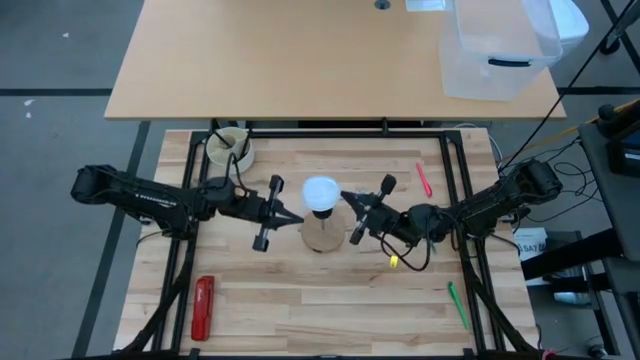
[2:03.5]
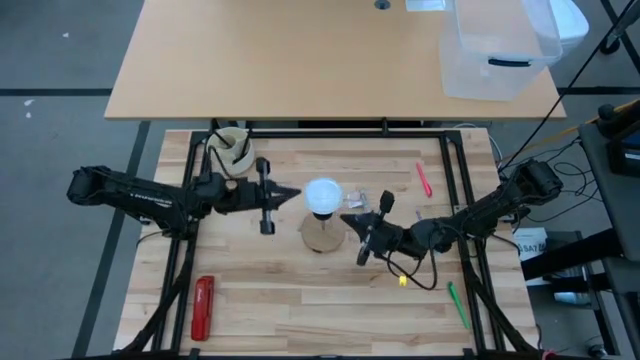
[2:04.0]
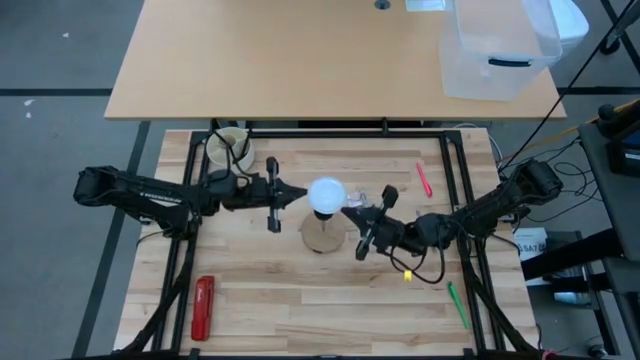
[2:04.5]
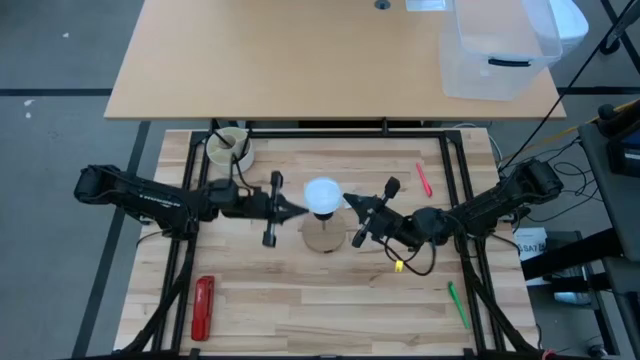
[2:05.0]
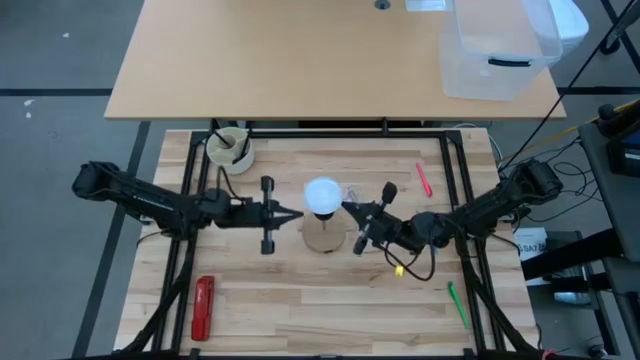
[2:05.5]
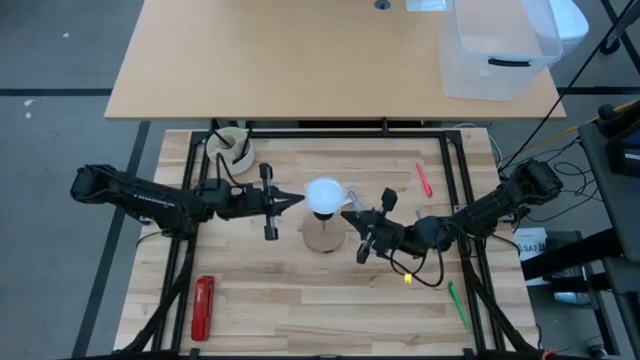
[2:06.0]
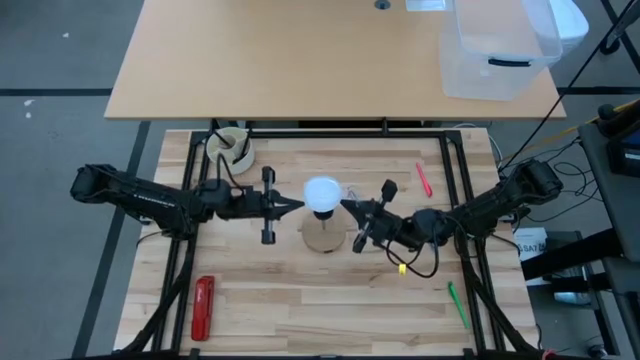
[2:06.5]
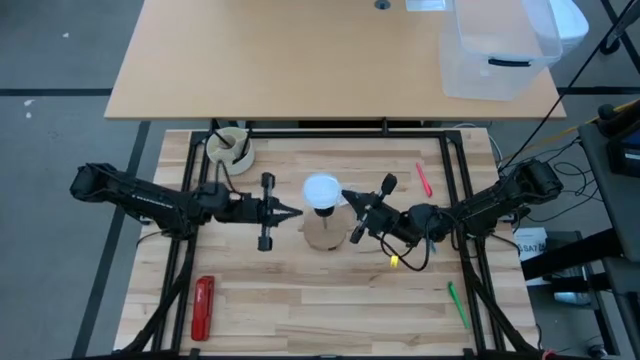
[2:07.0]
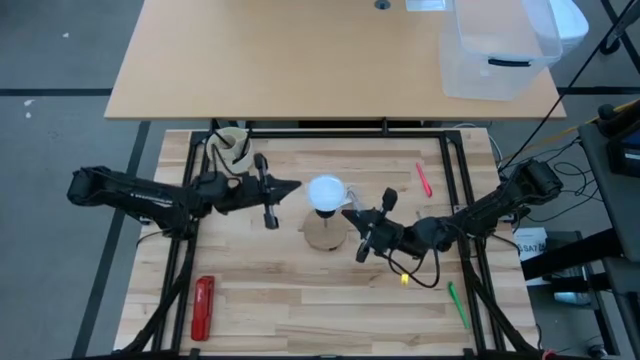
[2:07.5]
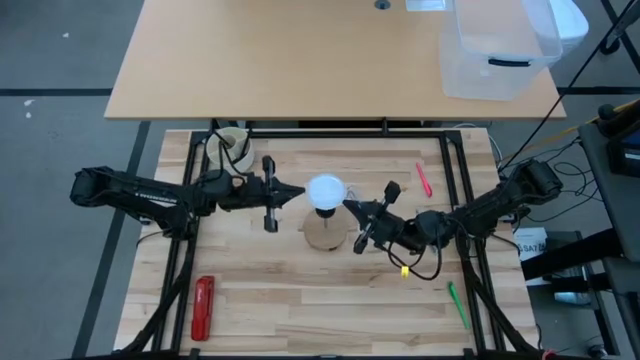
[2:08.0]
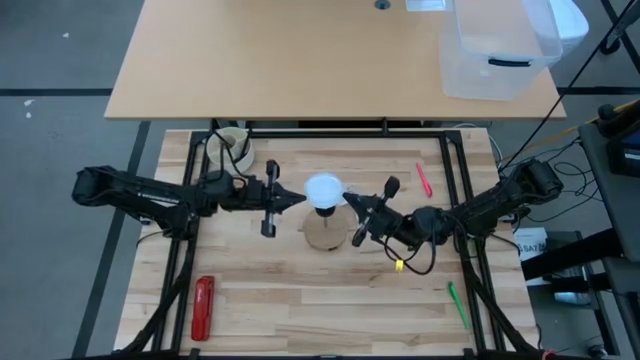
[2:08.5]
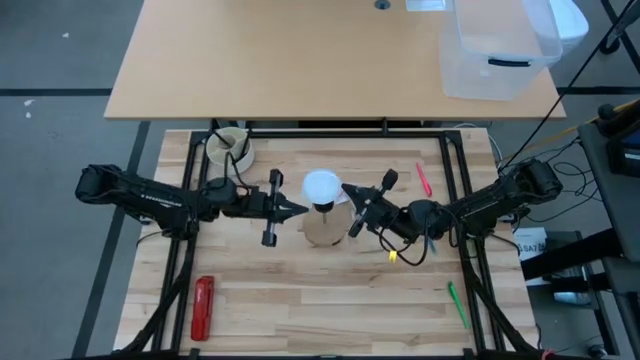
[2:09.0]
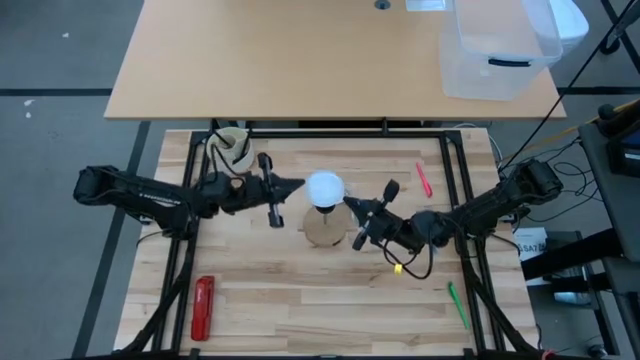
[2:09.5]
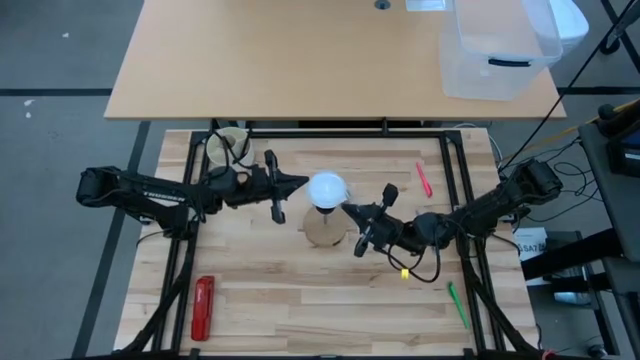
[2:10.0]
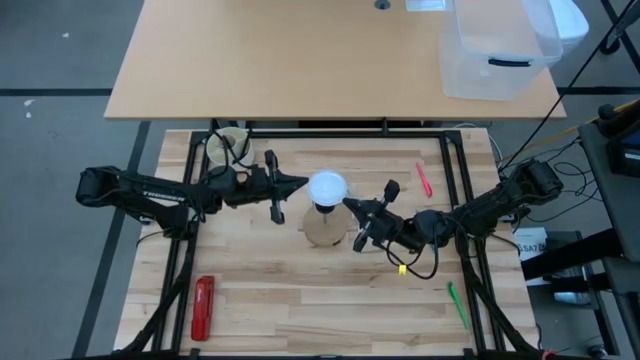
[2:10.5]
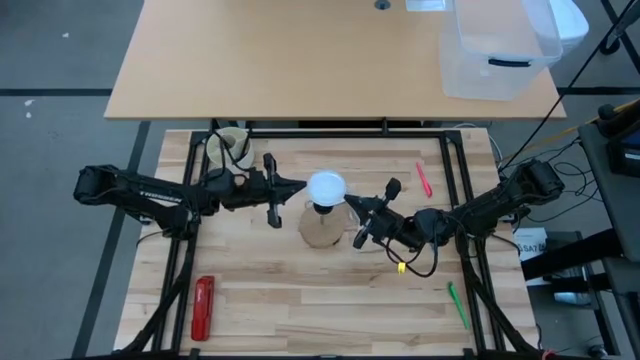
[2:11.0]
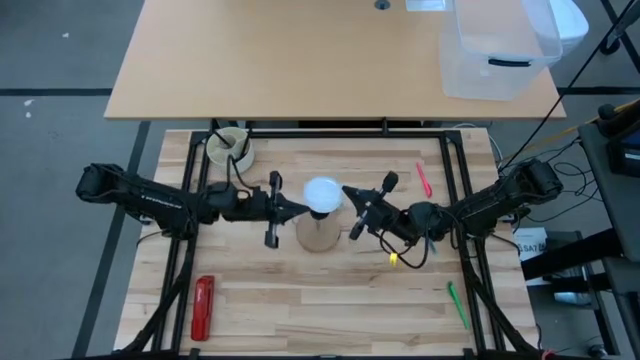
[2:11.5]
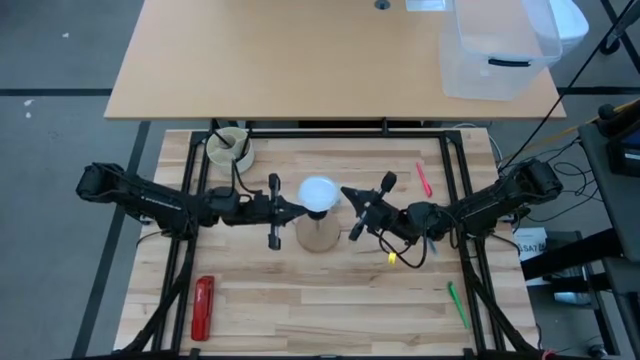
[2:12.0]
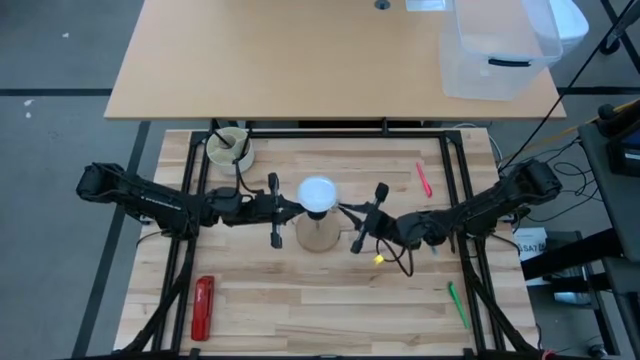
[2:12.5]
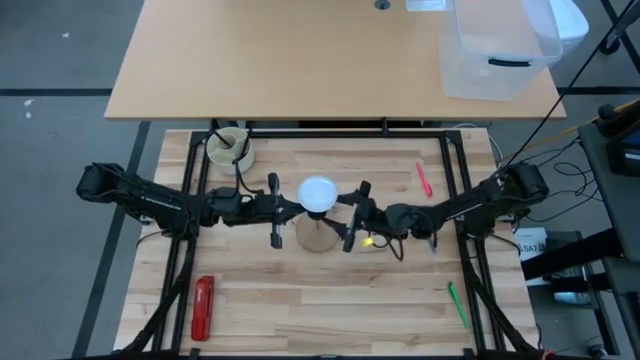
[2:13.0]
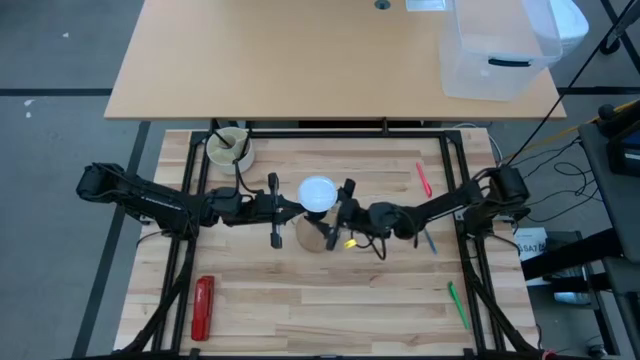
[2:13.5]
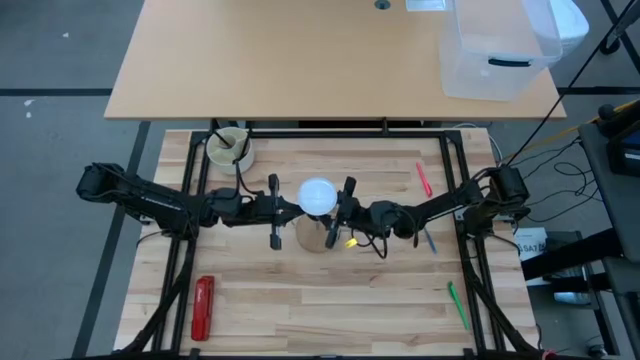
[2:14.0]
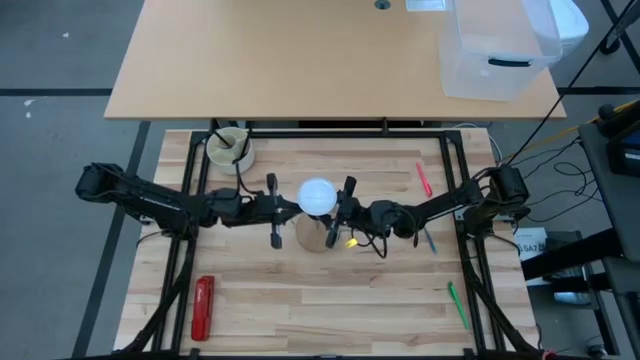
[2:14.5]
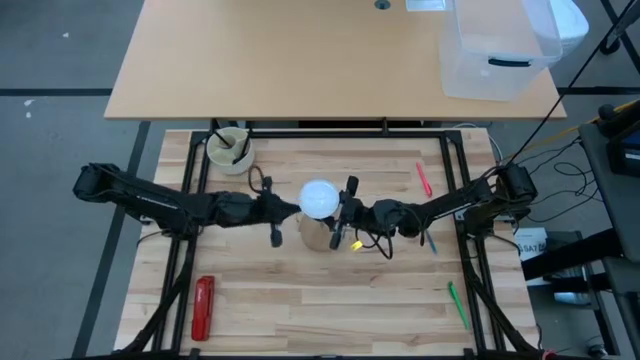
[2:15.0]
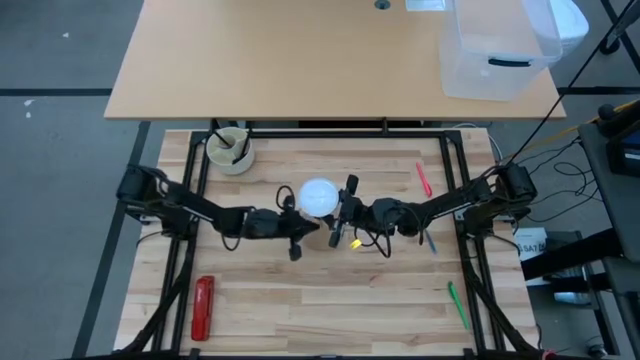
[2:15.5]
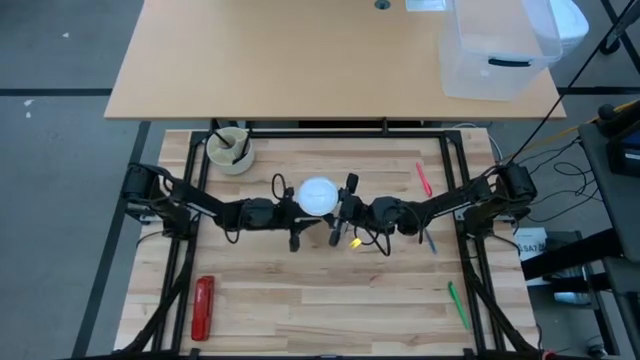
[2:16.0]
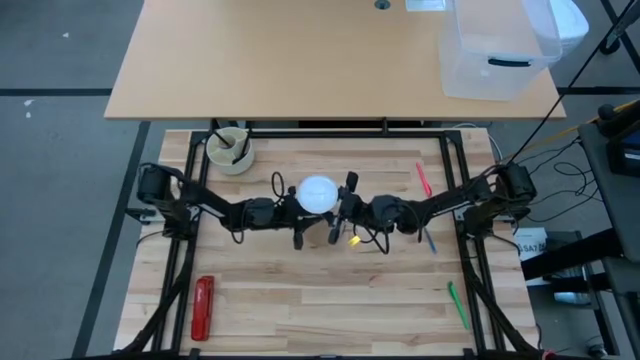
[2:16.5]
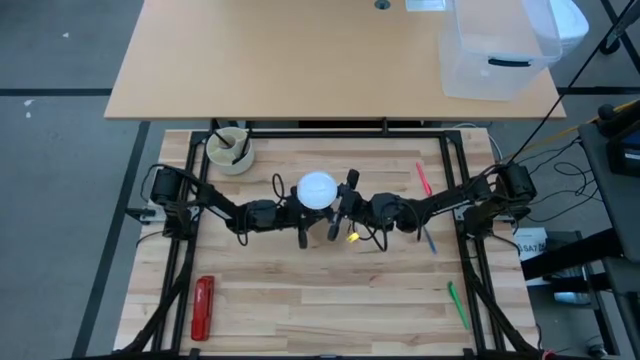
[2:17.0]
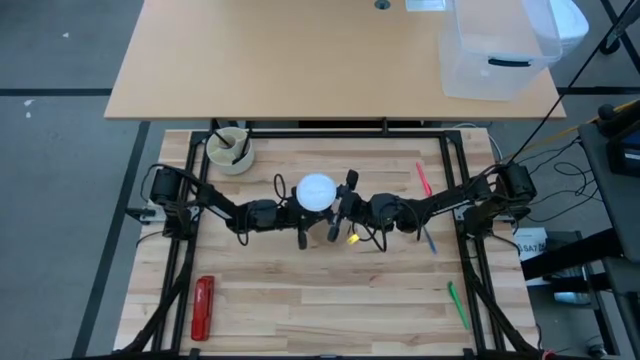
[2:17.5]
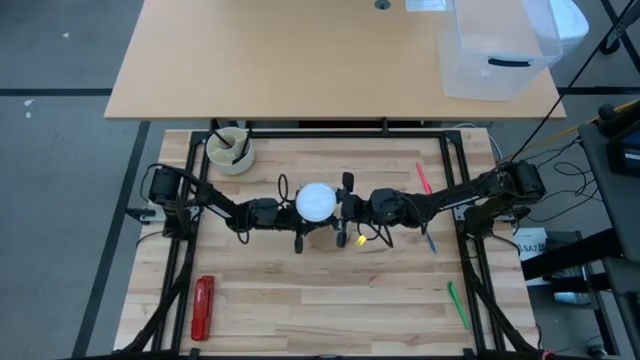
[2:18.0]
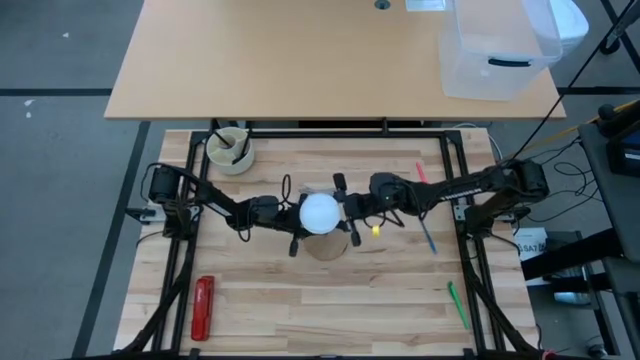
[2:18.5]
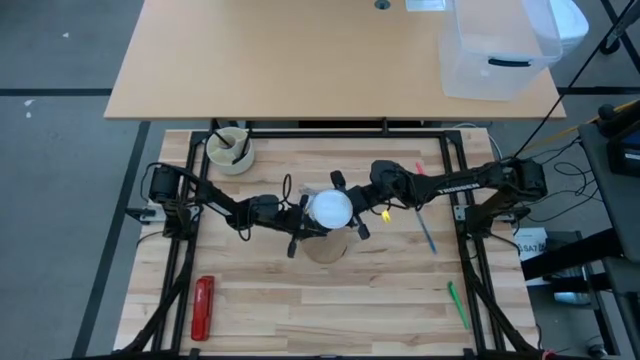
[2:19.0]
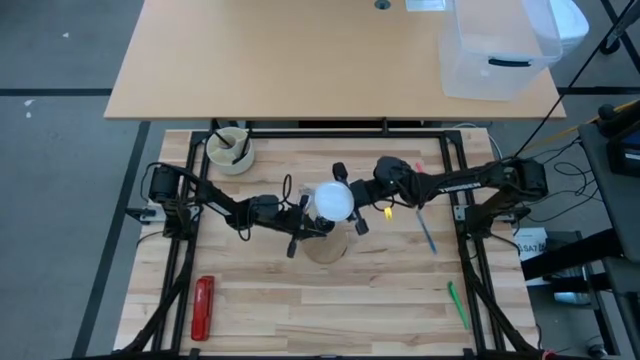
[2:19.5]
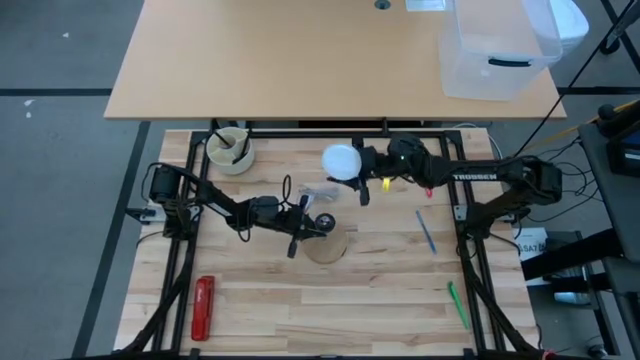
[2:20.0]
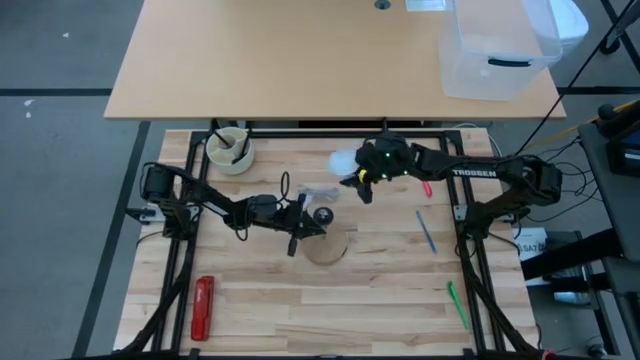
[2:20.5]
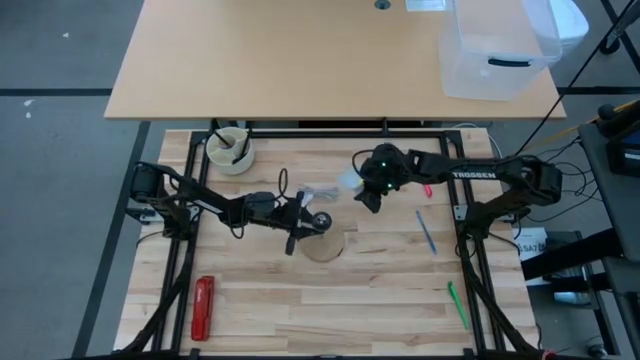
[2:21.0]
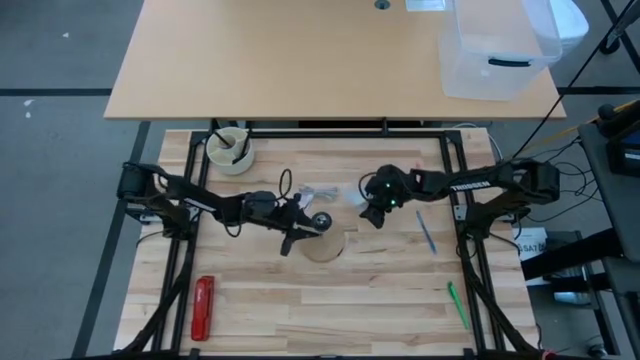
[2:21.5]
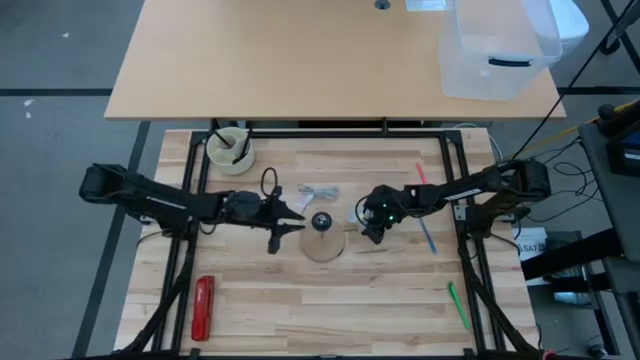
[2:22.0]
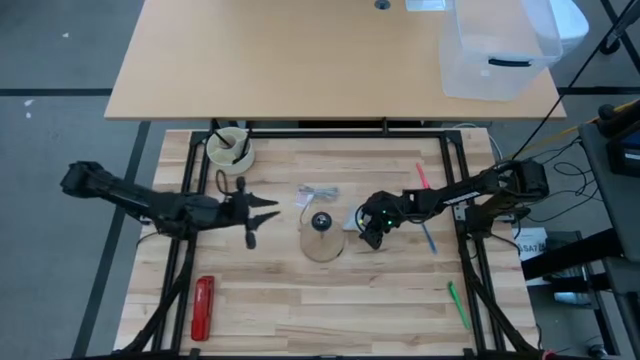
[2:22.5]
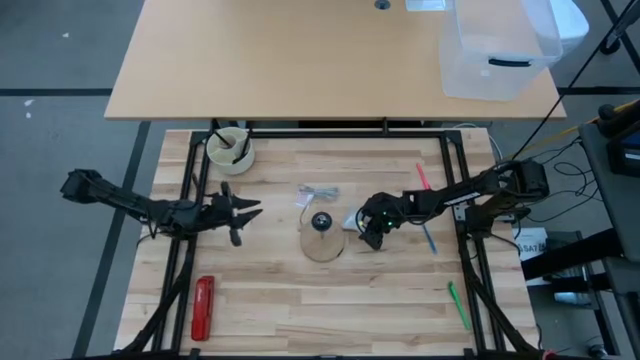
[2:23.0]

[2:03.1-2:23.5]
Task: Screw lightbulb
Remove the lightbulb from the desk lamp
